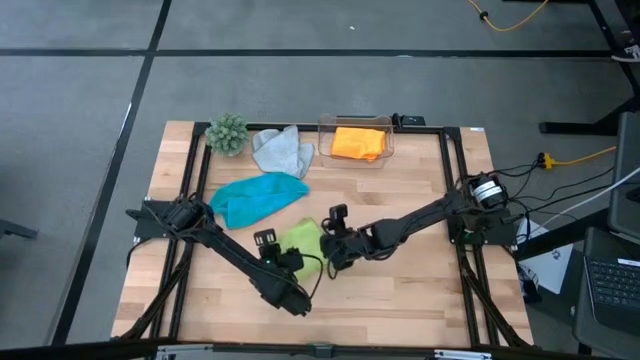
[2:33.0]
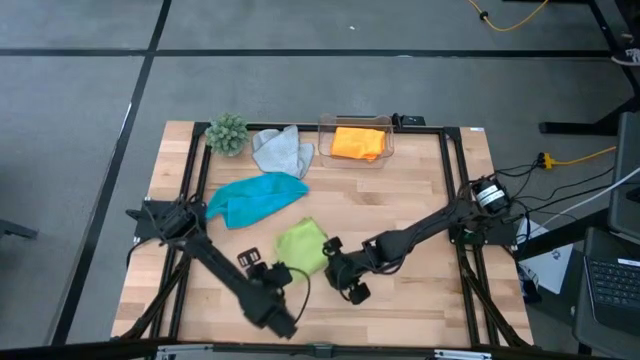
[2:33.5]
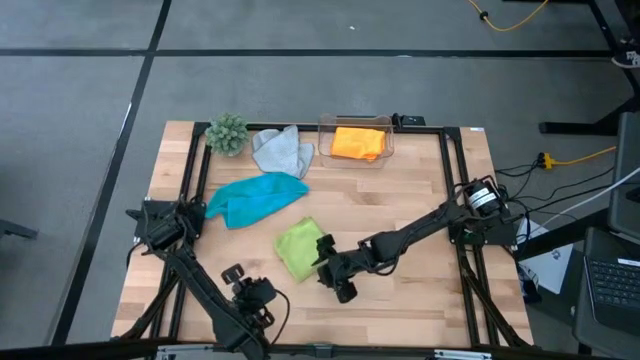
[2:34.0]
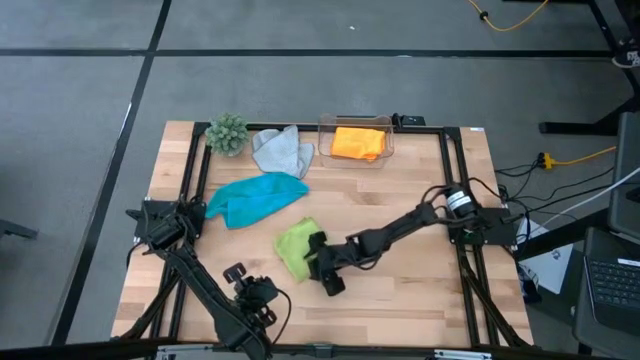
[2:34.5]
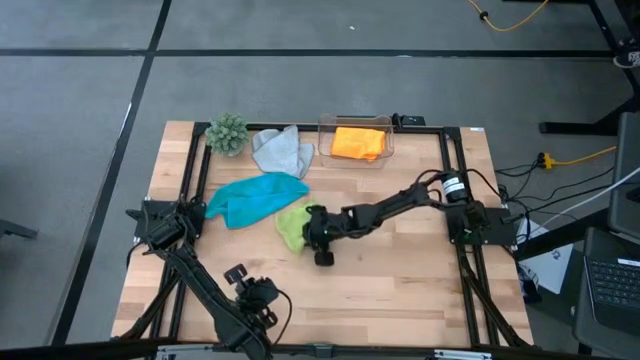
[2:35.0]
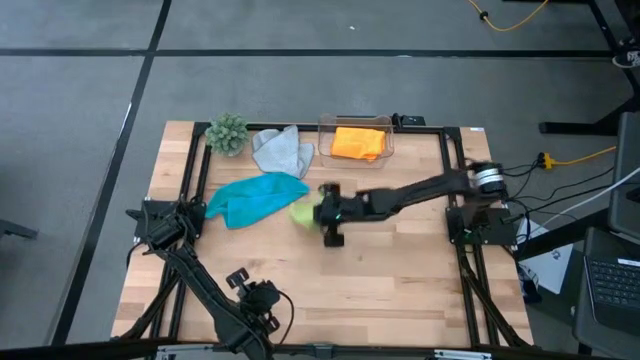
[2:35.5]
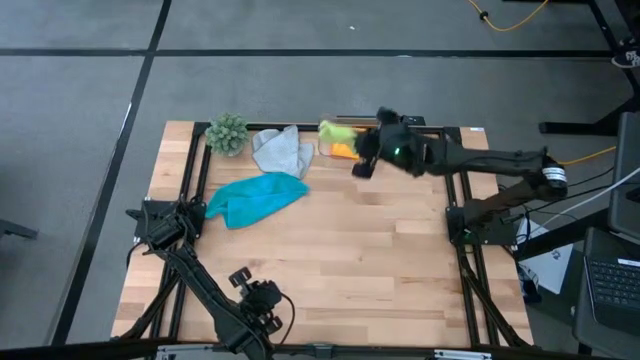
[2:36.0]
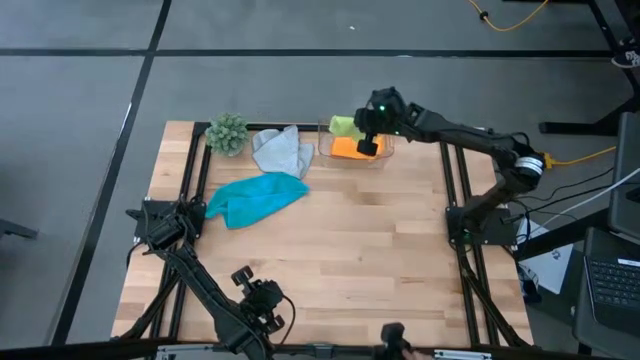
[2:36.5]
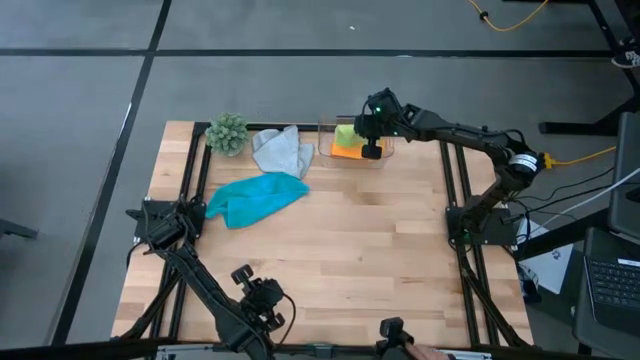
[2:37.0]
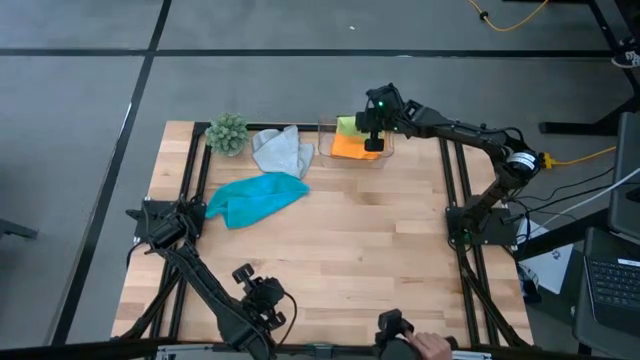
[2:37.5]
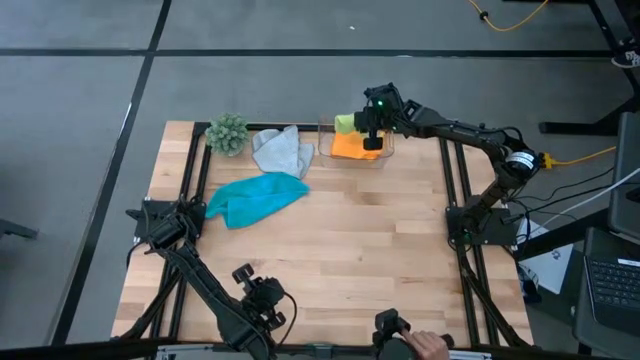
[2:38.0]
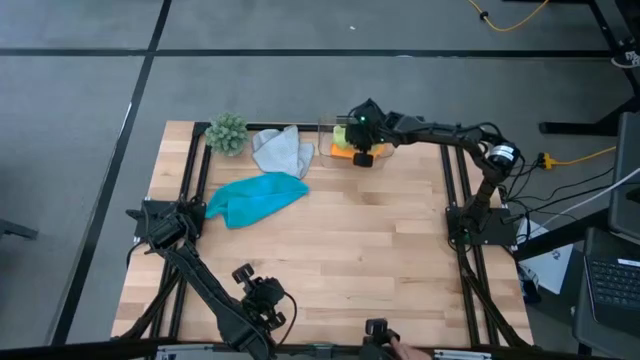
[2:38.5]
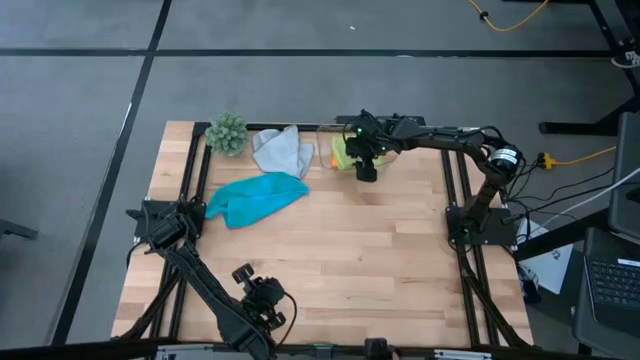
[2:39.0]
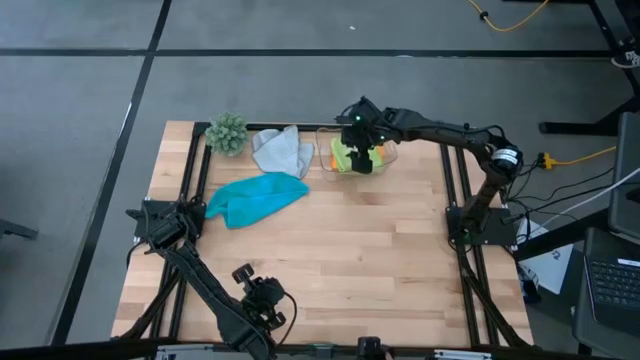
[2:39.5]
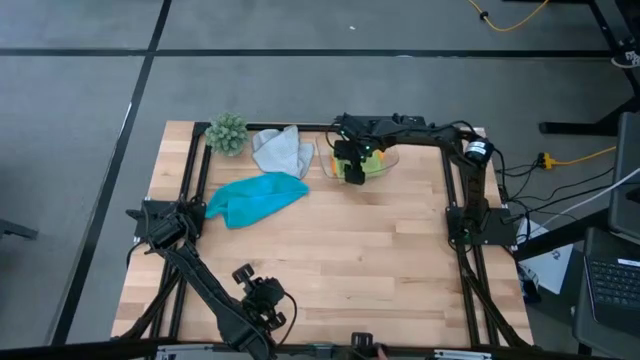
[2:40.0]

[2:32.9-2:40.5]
Task: Fold microfiber towels
Put the green microfiber cloth into the transparent bin

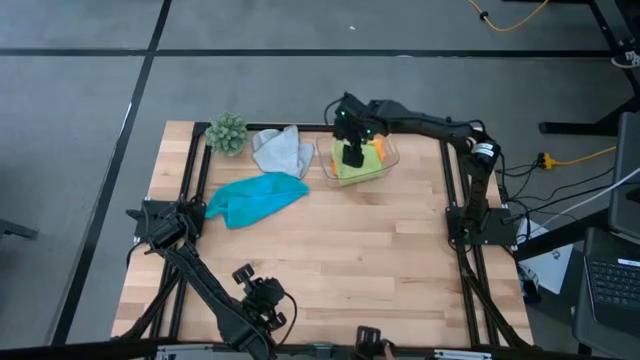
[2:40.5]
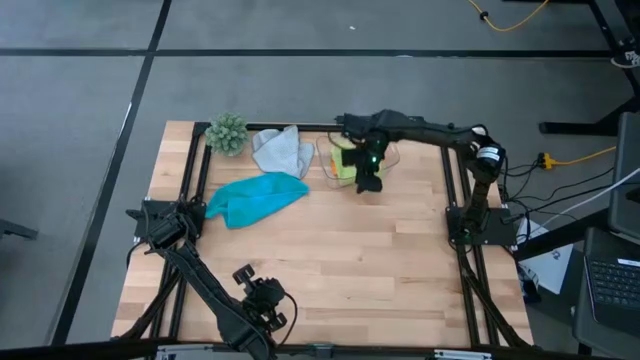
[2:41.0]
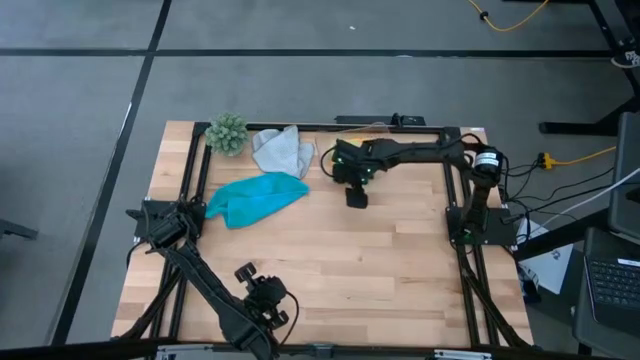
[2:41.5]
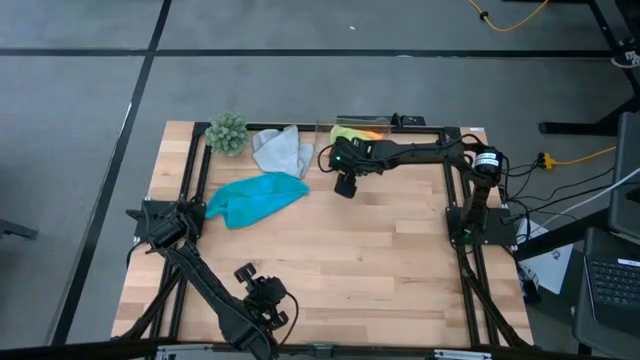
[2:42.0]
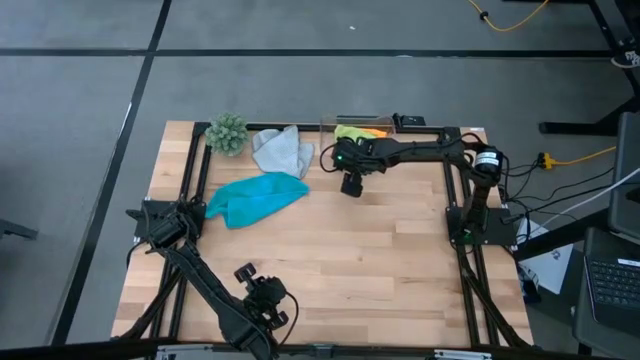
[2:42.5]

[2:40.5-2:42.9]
Adjust the transparent bin

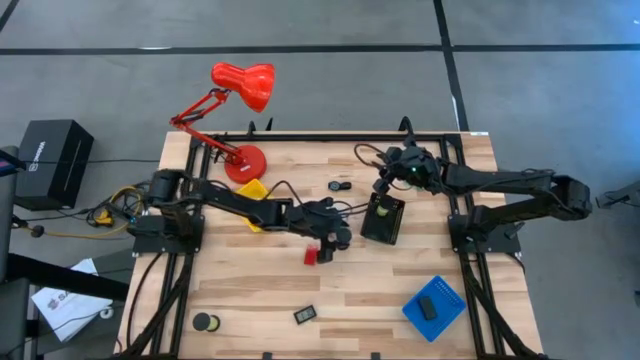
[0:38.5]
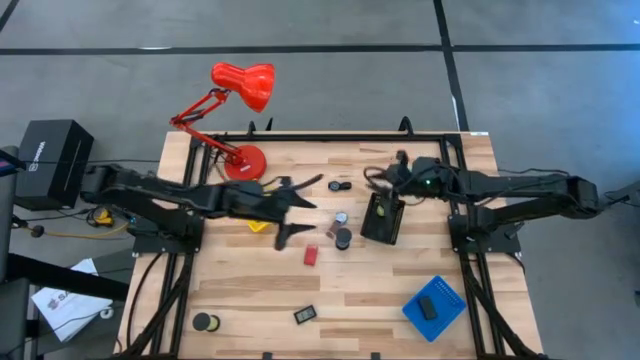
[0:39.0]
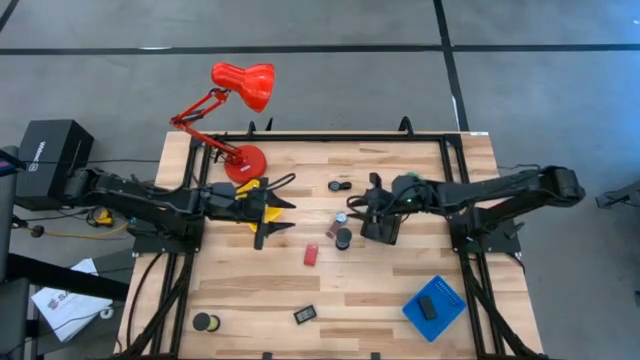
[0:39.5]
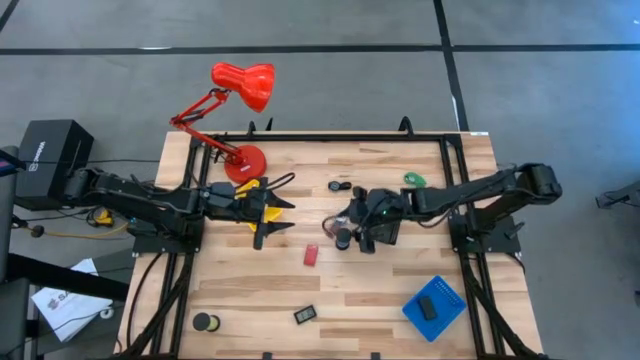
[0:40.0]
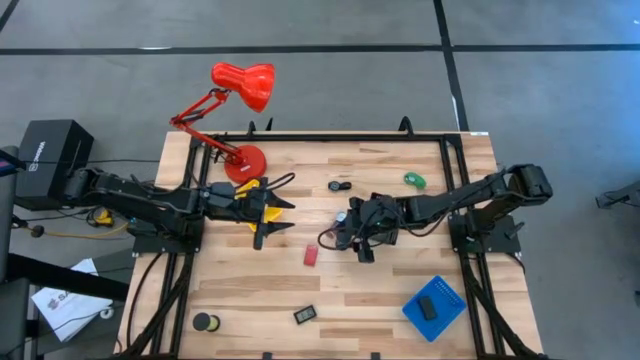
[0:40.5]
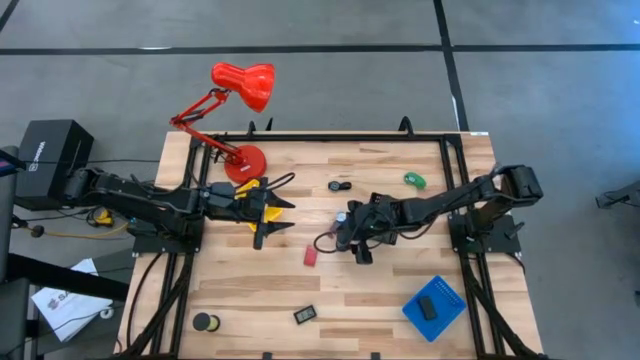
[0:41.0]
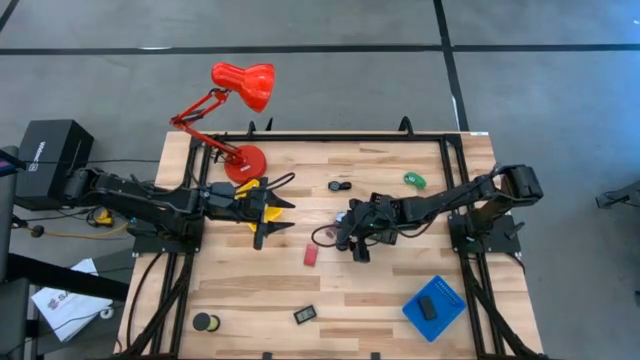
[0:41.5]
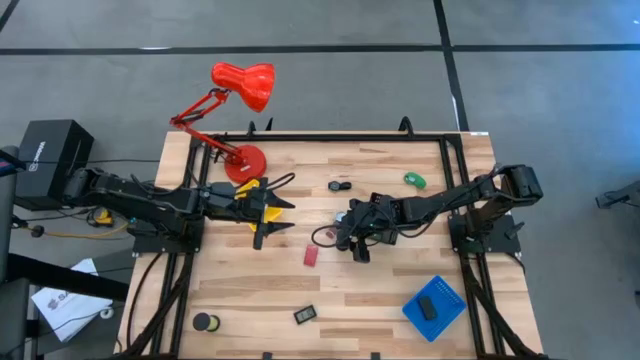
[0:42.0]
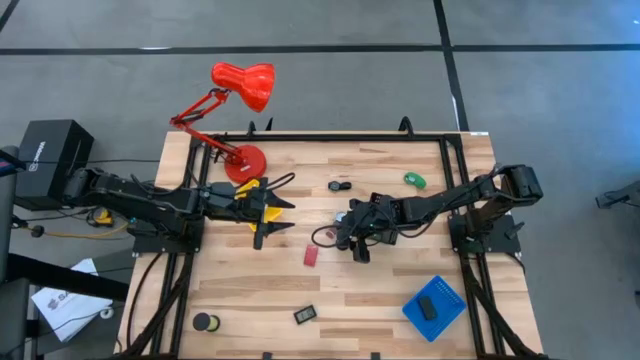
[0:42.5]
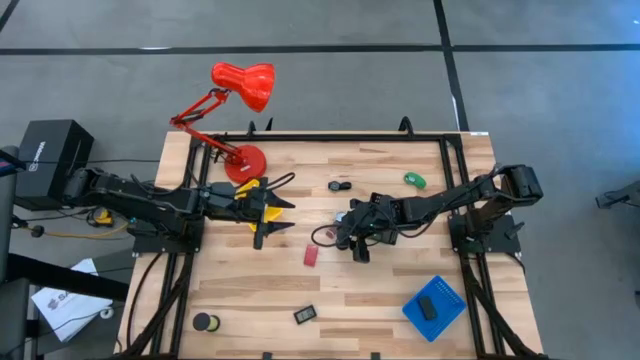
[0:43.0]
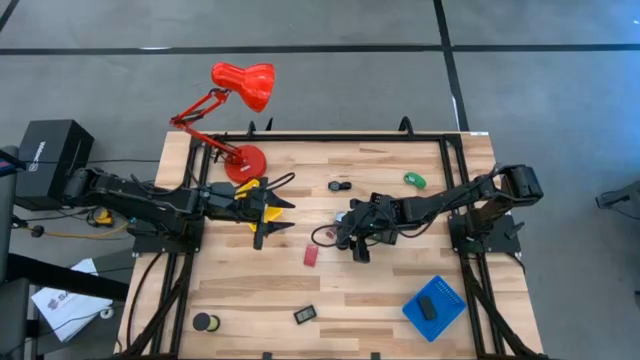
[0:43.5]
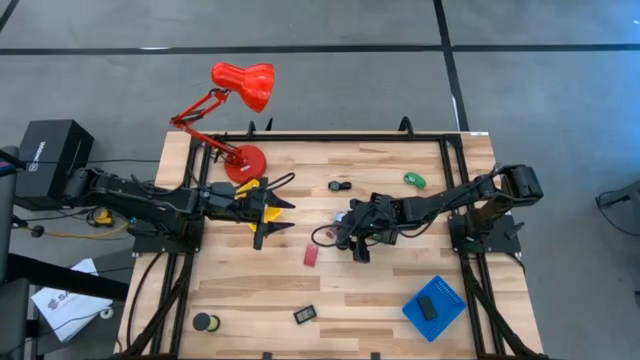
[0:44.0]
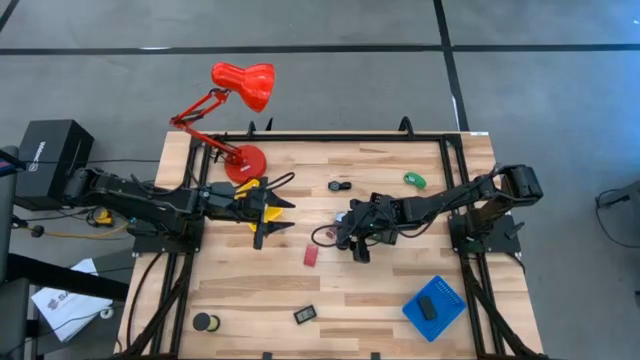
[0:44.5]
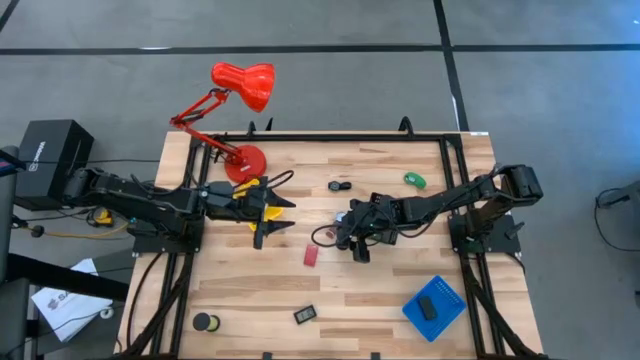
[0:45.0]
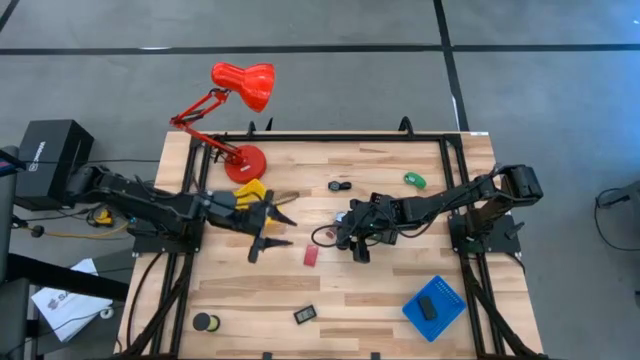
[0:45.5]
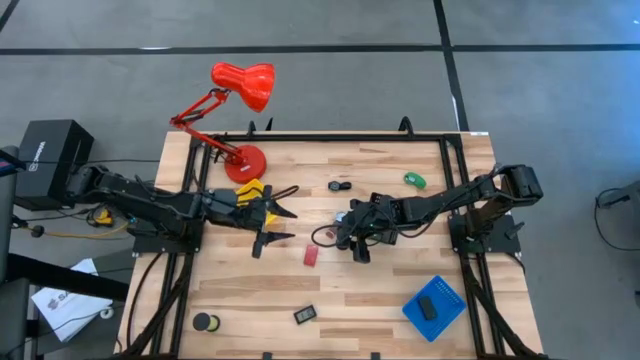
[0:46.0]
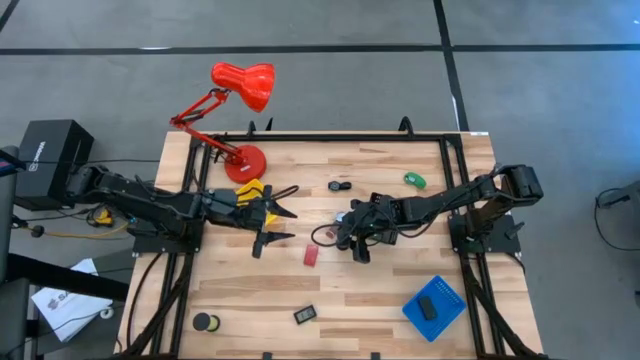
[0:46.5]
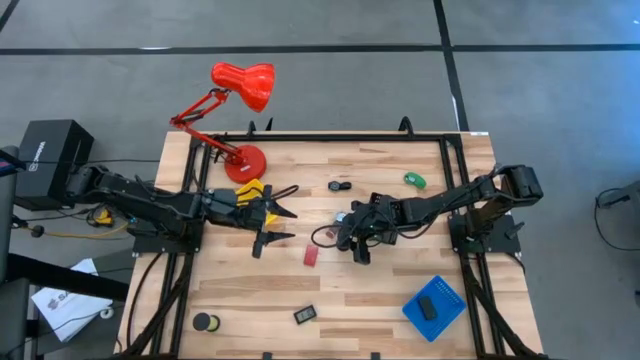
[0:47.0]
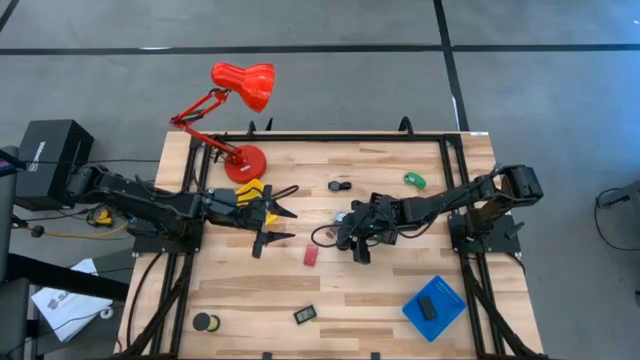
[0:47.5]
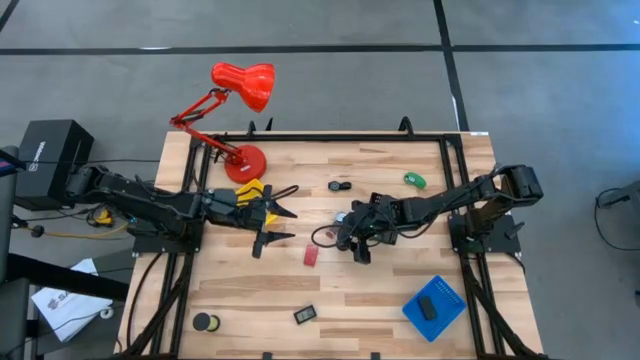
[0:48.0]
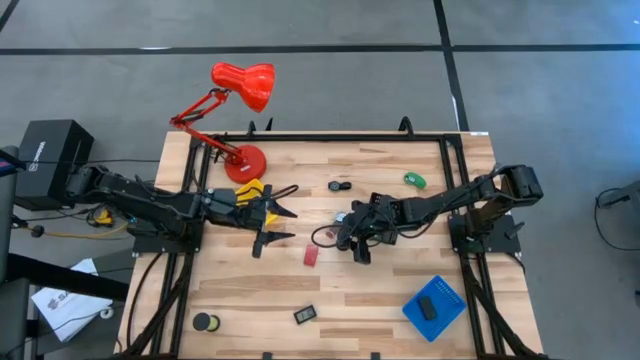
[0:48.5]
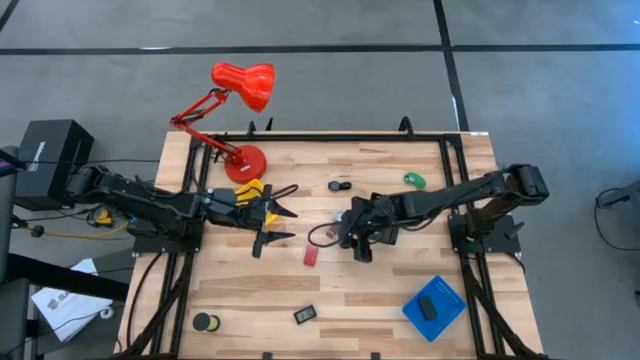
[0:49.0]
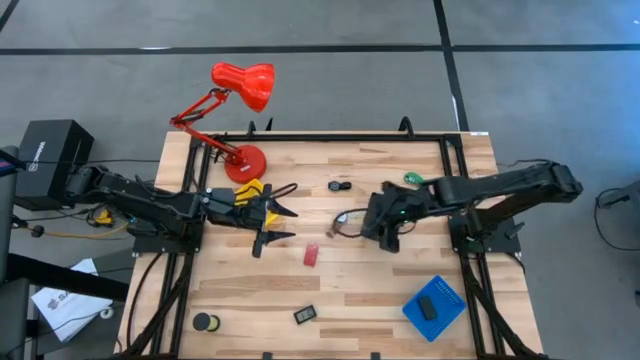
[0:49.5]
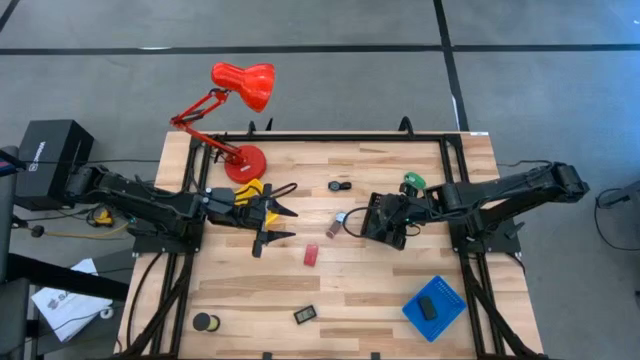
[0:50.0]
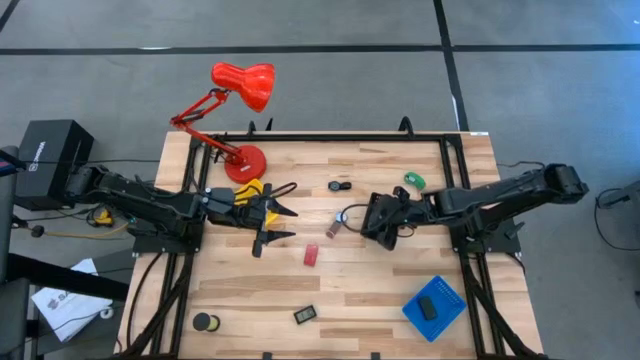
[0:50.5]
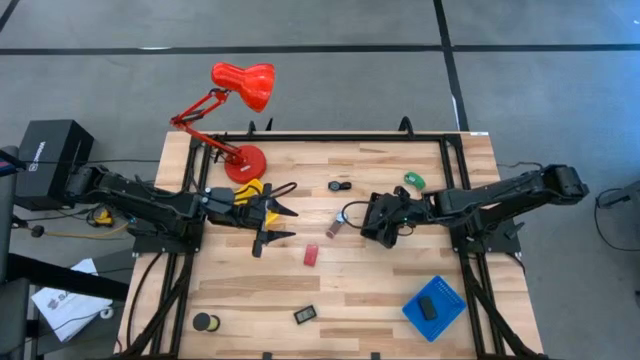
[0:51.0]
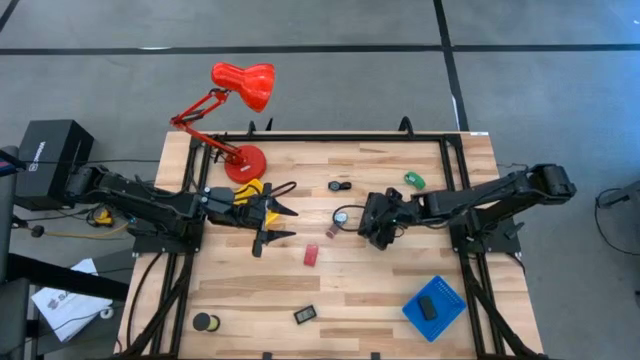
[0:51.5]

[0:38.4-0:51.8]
Task: Pick & Place Office items
Put the purple hourglass into the black bin
